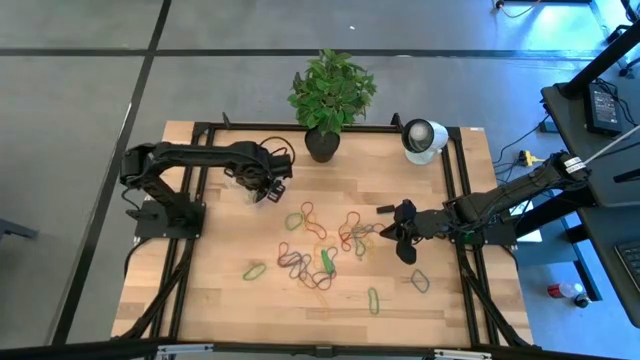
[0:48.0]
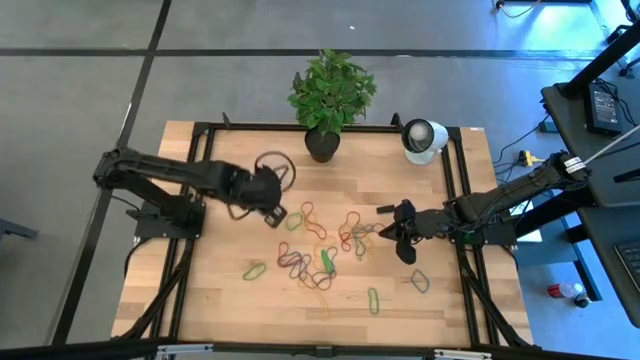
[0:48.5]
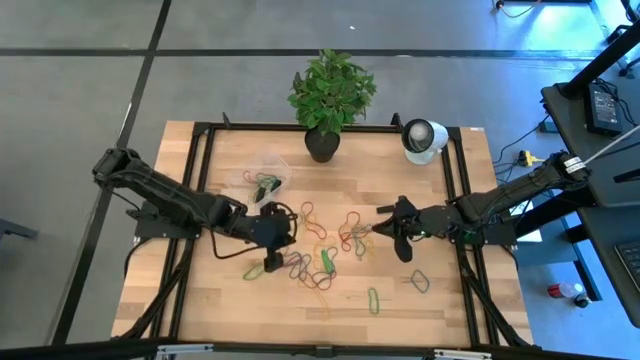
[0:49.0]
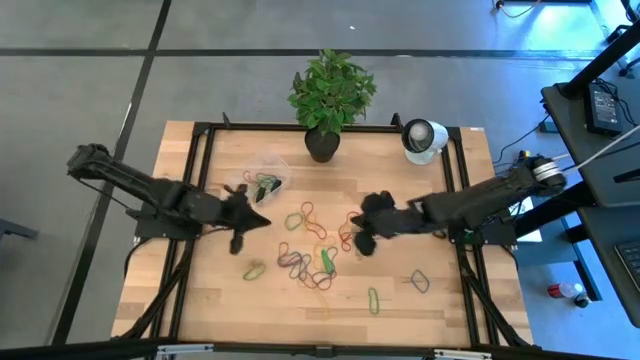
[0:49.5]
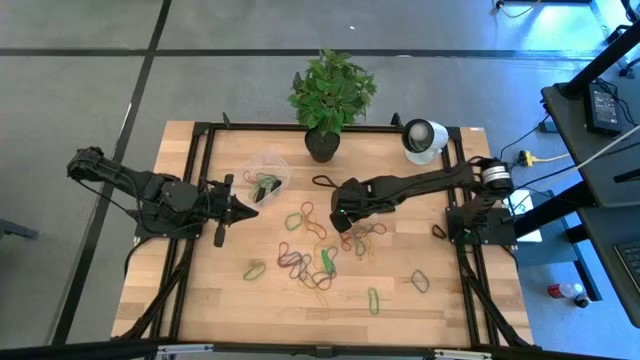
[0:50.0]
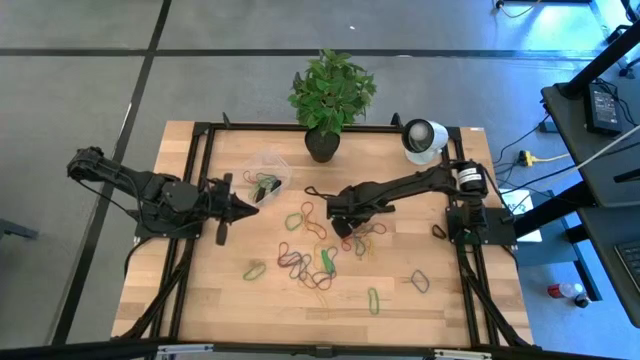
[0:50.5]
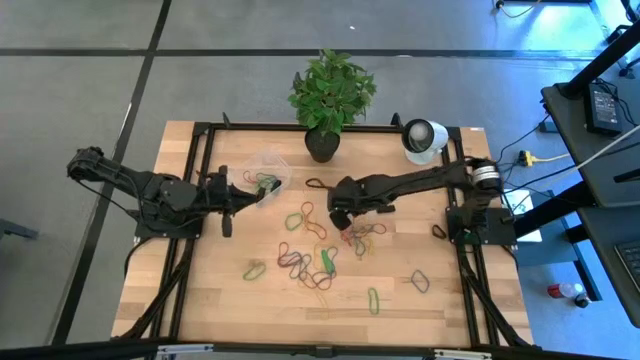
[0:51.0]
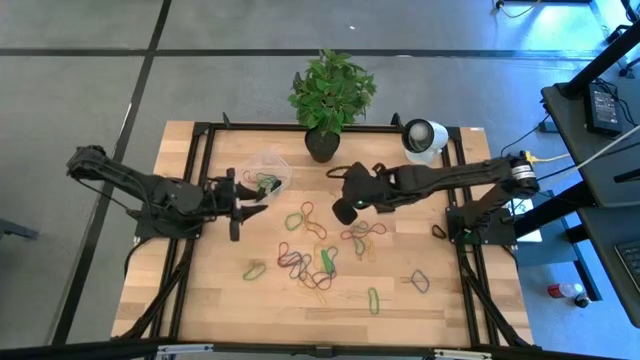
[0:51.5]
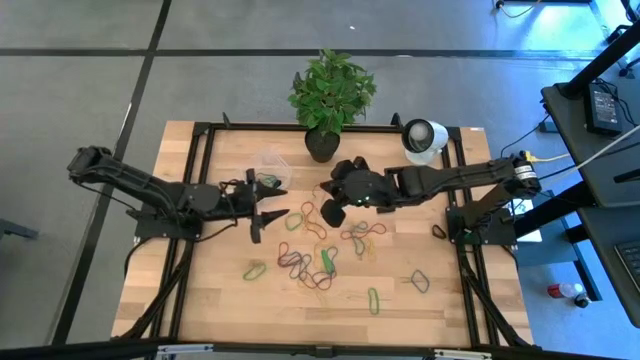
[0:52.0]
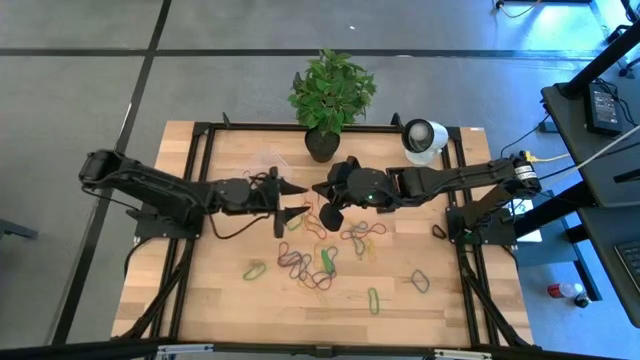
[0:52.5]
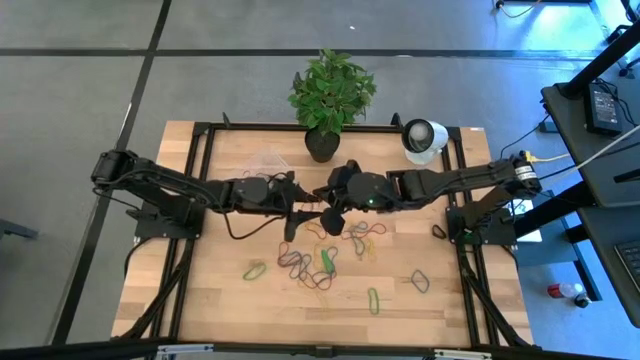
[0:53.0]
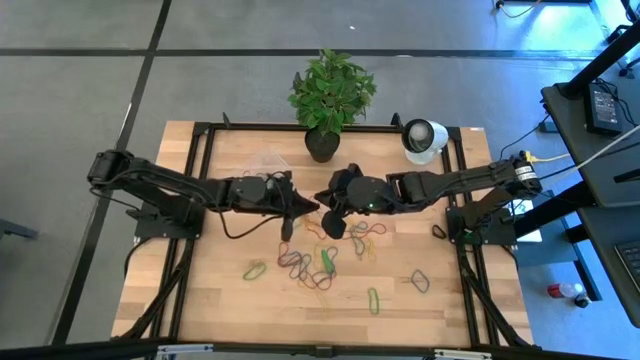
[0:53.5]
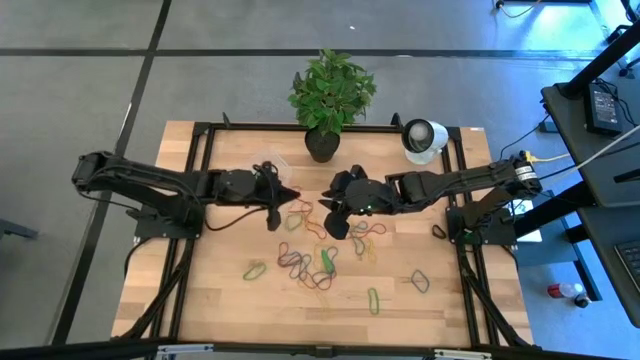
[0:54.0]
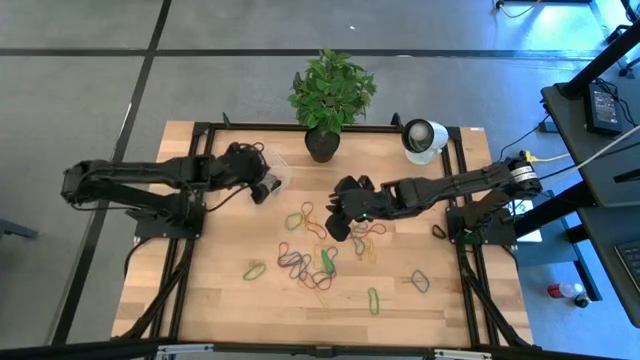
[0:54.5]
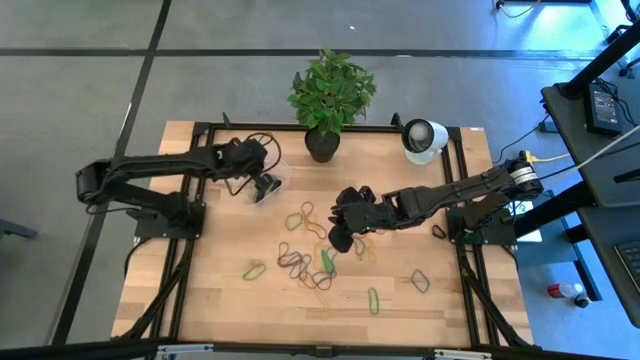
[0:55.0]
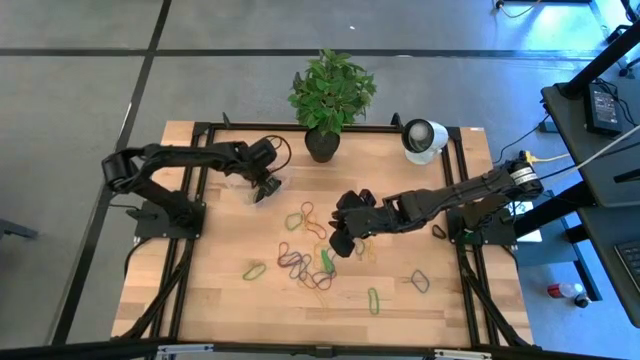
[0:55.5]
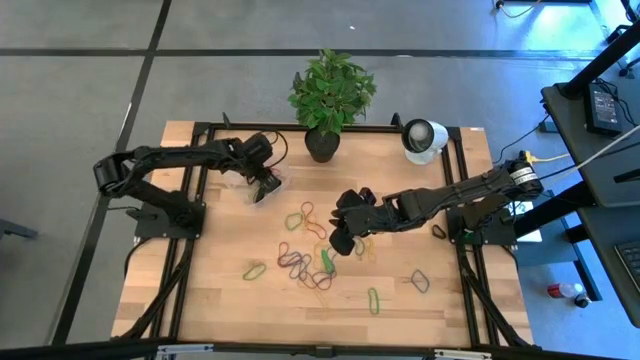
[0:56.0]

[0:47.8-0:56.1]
Task: Pick and place rubber bands into bin
Put the red rubber band into the transparent bin

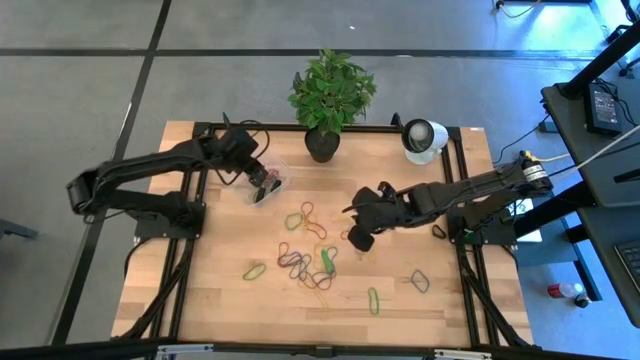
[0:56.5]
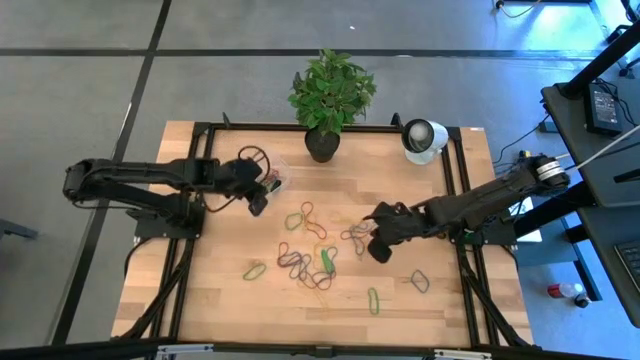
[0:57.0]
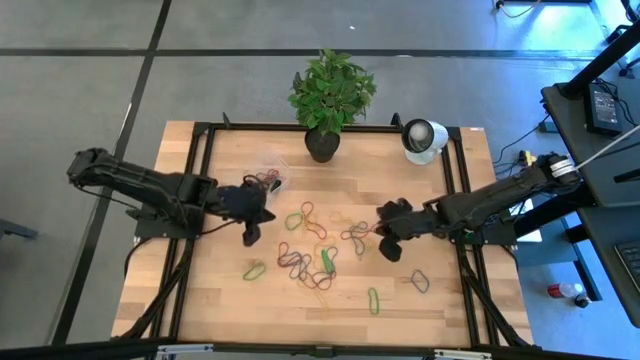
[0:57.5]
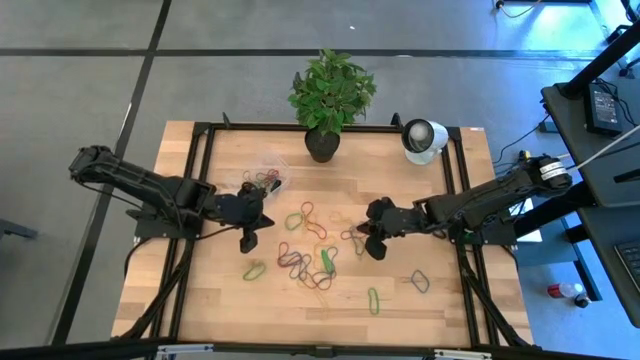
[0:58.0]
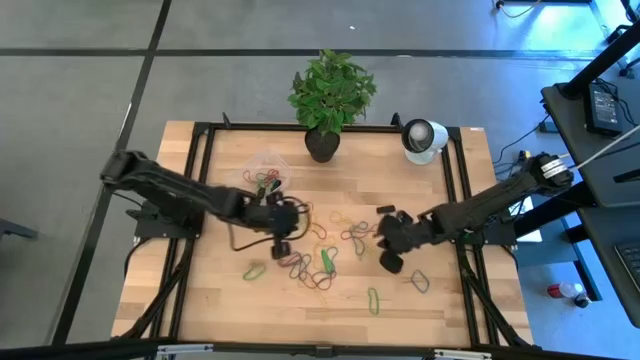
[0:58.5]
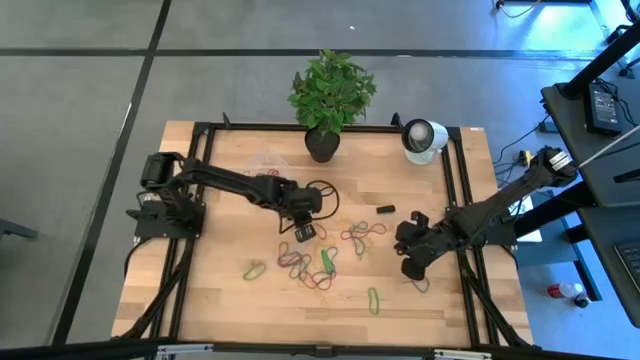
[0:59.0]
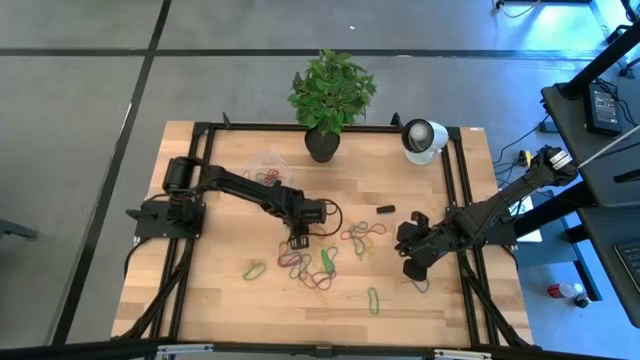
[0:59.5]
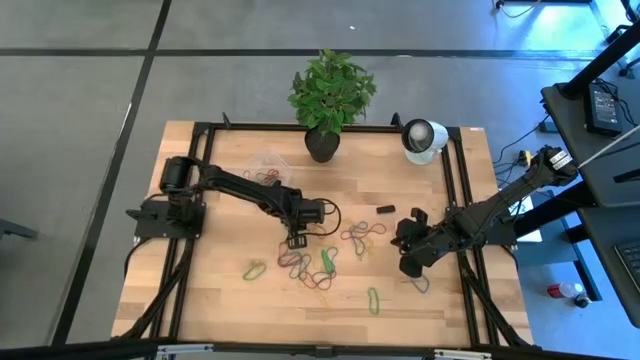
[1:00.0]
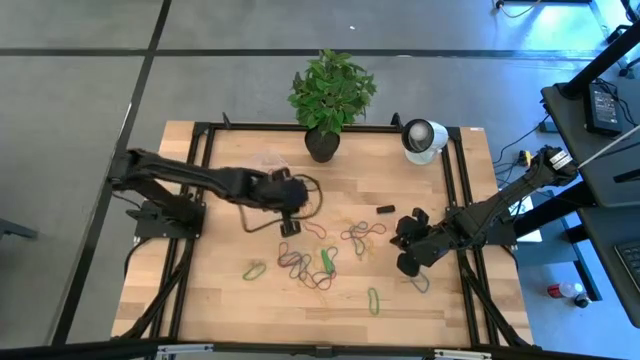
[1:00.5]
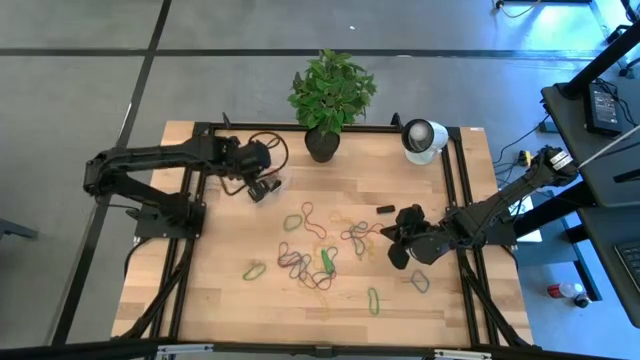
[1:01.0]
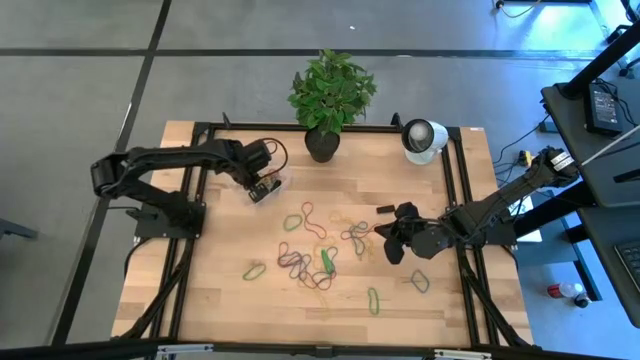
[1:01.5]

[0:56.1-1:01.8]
Put the yellow rubber band into the transparent bin

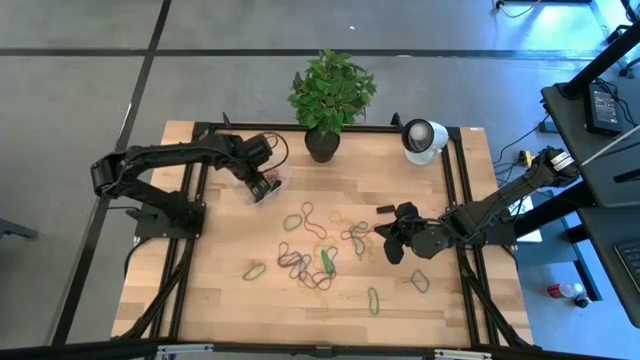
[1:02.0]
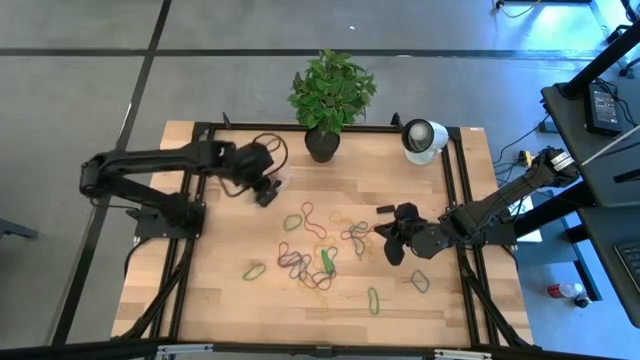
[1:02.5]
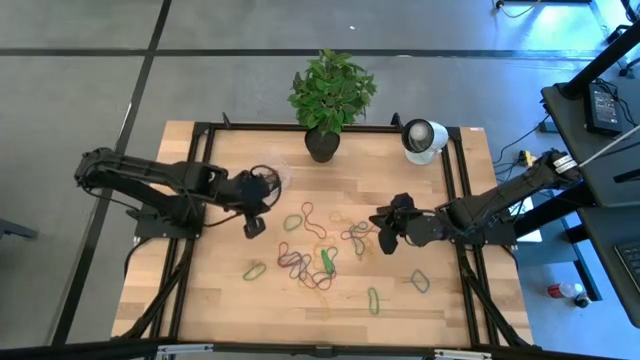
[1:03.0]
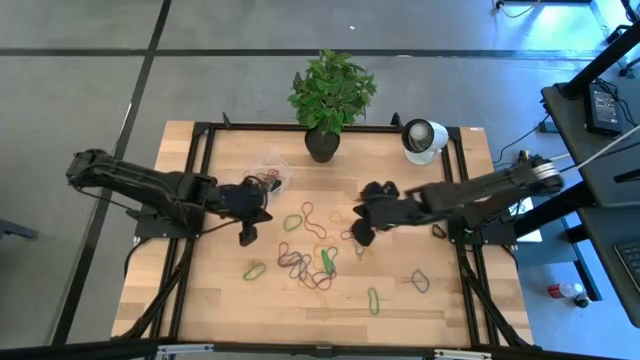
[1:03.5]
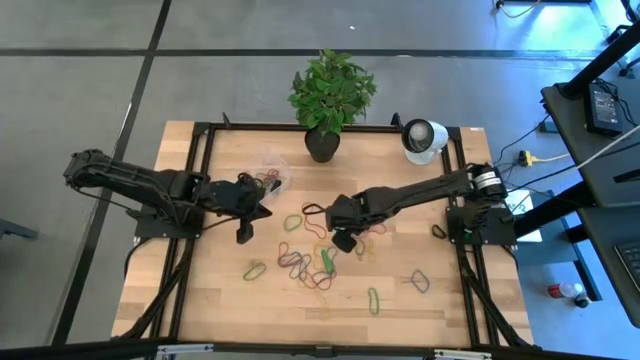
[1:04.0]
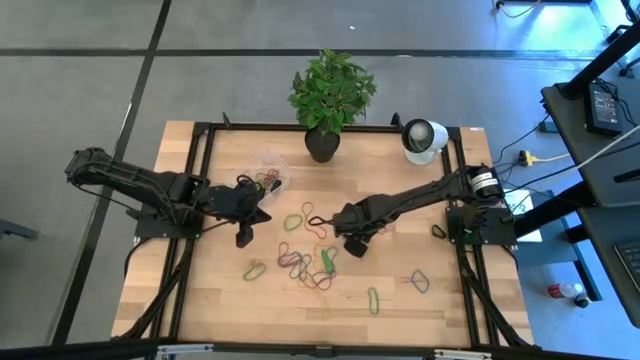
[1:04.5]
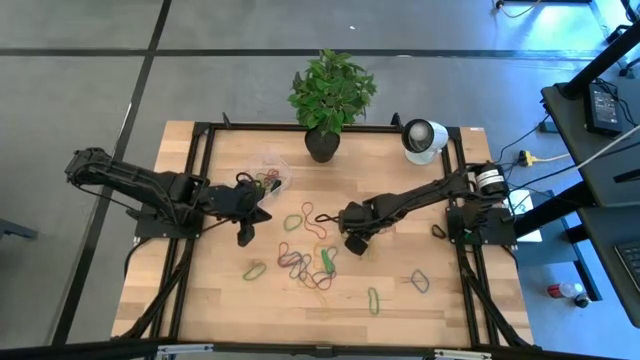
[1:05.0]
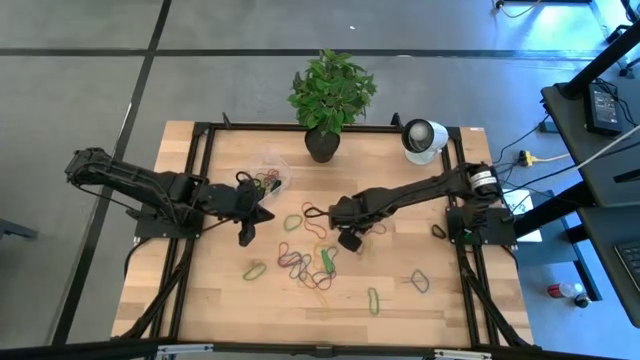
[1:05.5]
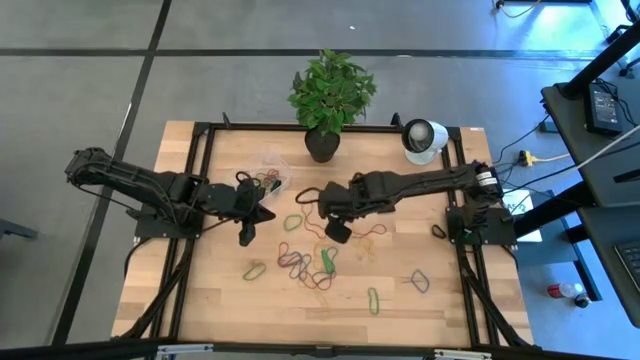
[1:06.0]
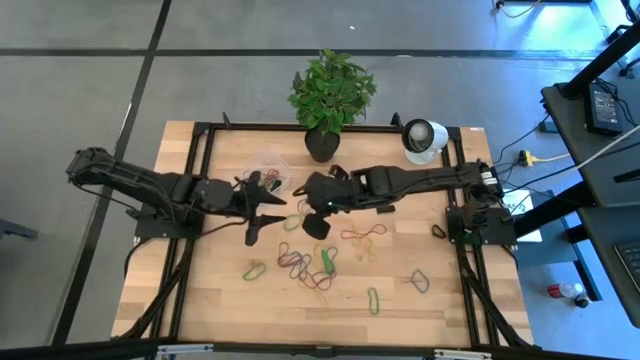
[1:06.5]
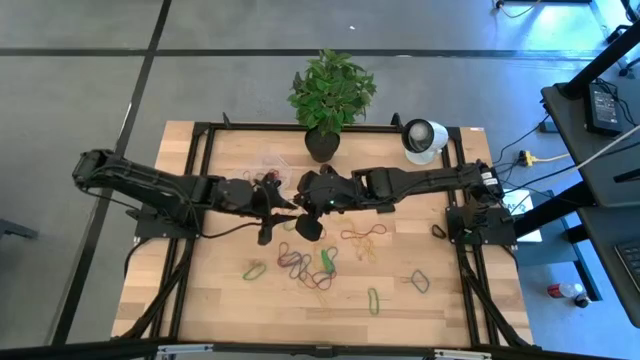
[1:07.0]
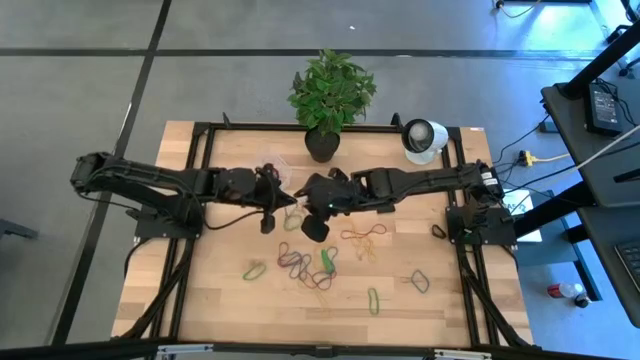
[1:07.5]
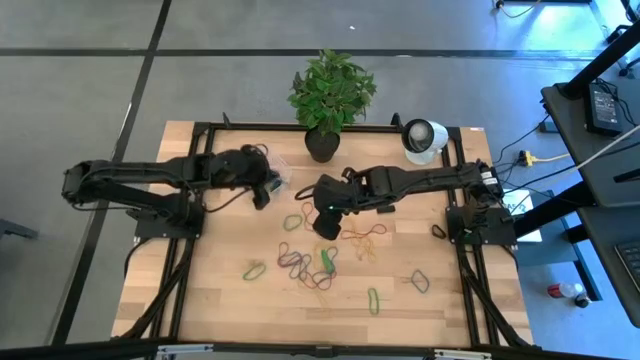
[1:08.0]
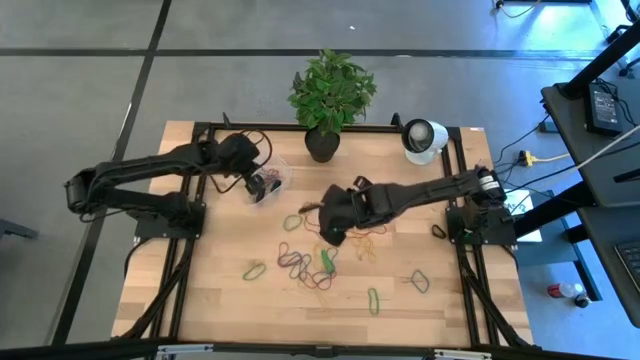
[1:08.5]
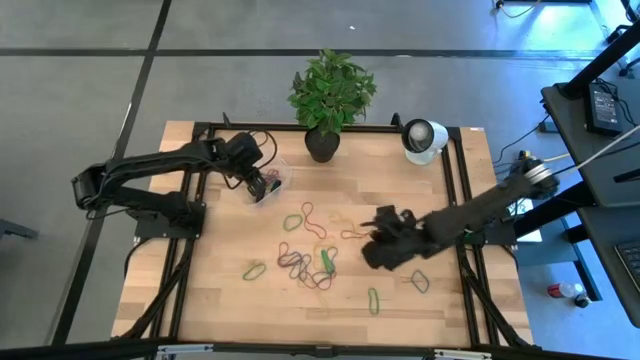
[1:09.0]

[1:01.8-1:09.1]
Put the blue rubber band into the transparent bin

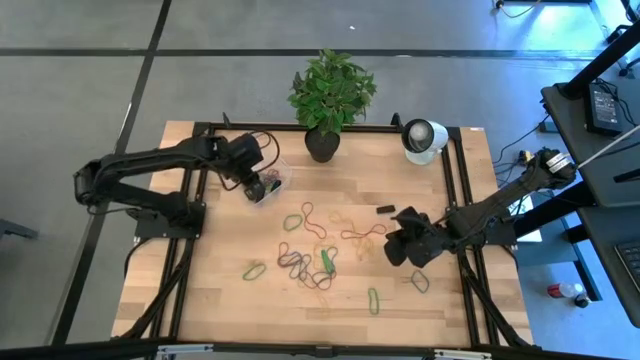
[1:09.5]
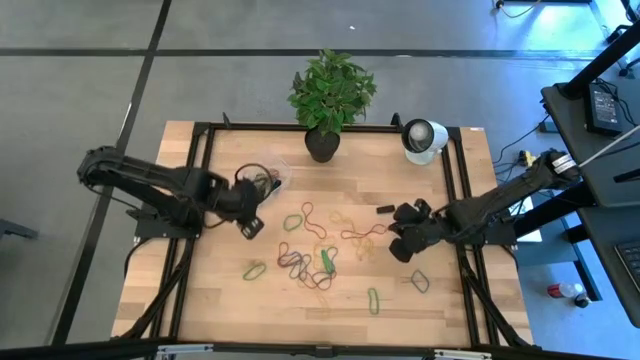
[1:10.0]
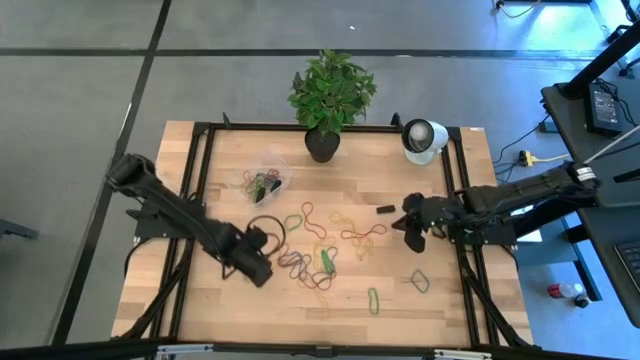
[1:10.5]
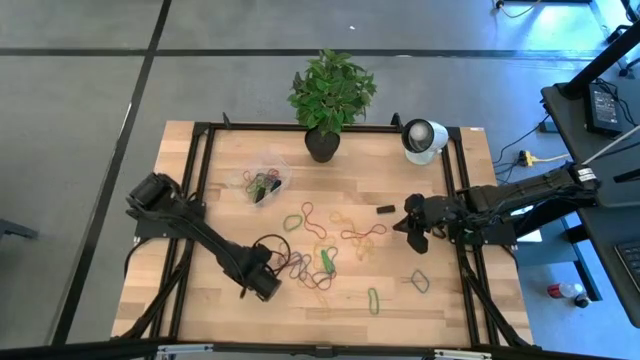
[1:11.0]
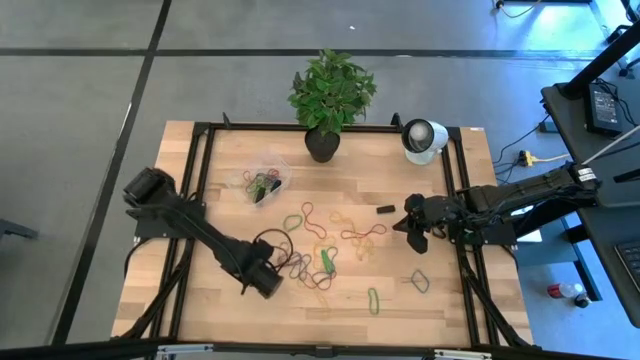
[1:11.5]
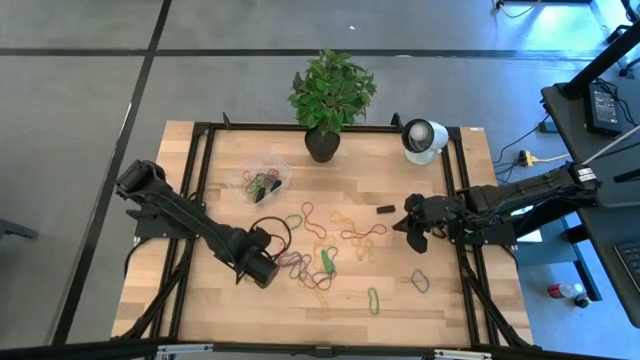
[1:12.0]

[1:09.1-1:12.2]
Put the green rubber band into the transparent bin
